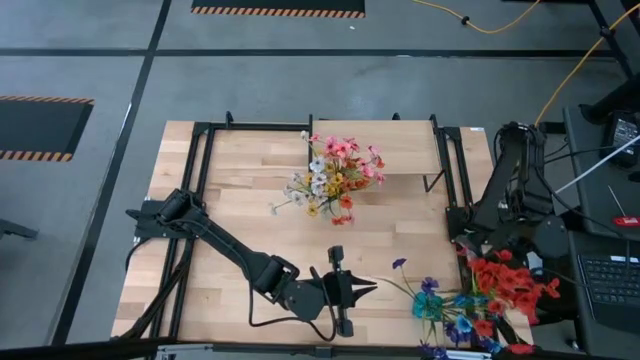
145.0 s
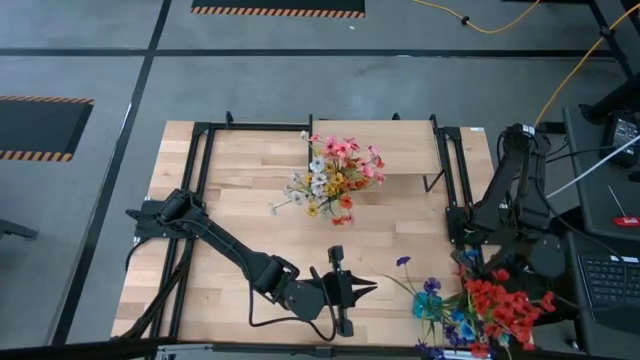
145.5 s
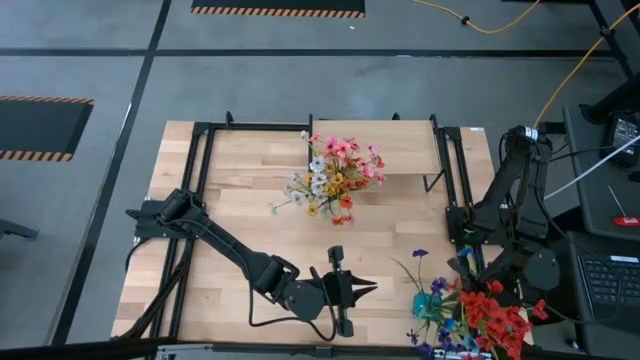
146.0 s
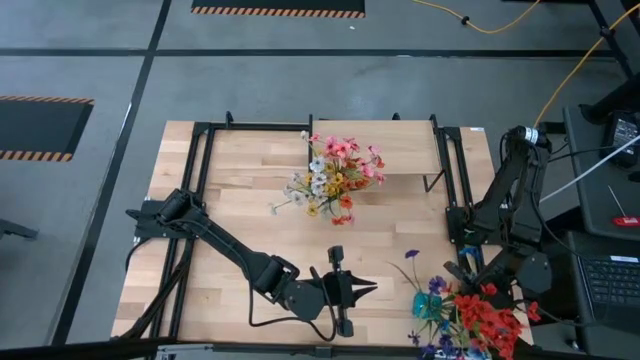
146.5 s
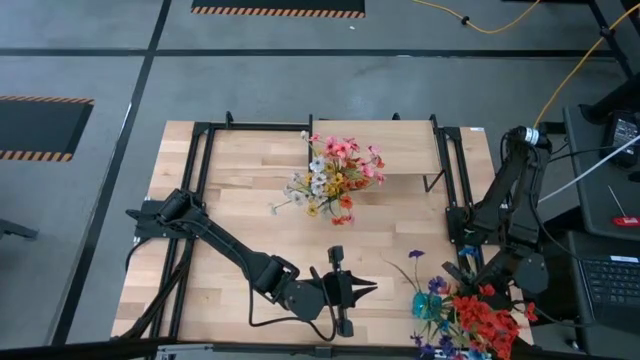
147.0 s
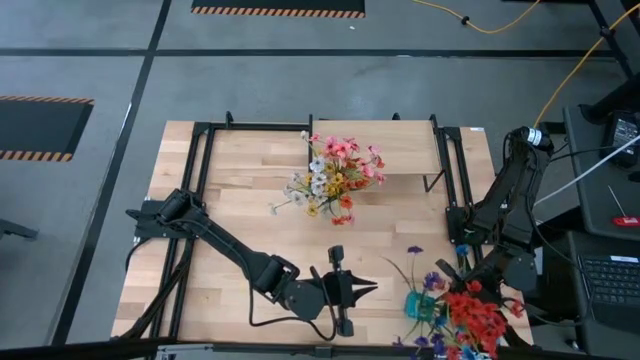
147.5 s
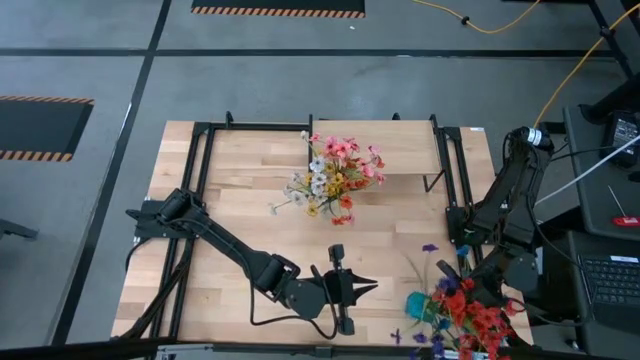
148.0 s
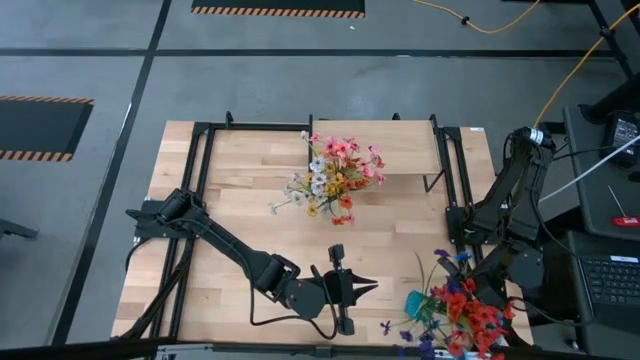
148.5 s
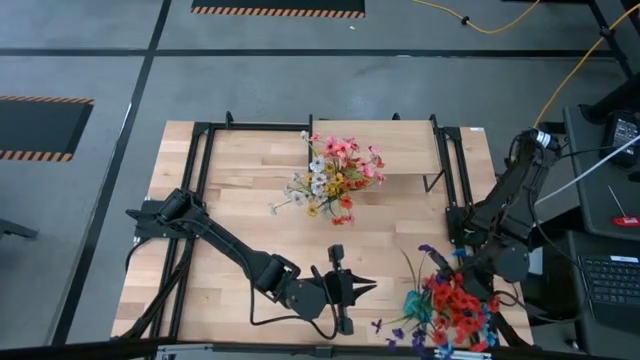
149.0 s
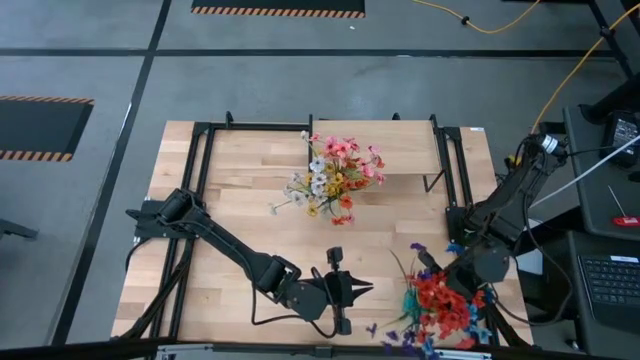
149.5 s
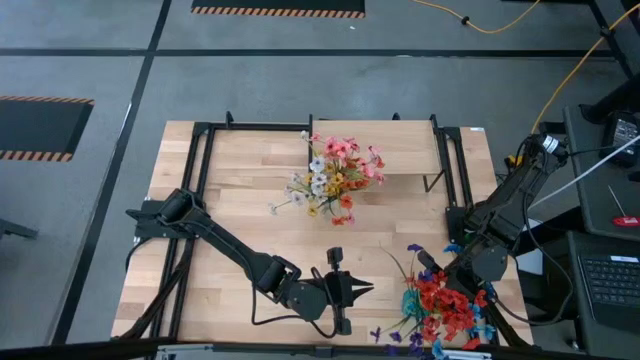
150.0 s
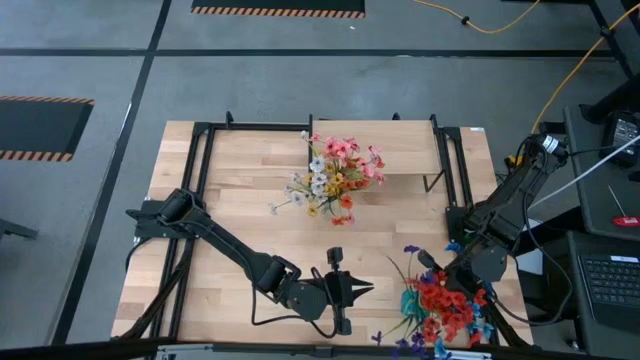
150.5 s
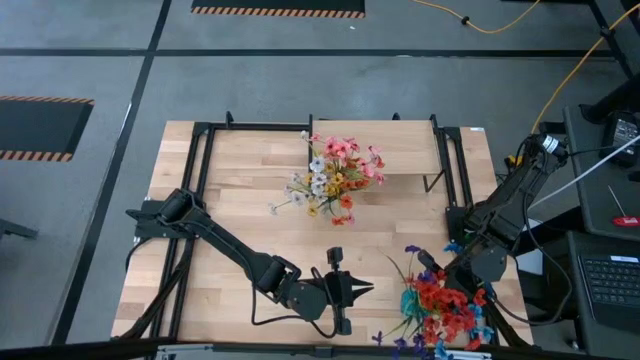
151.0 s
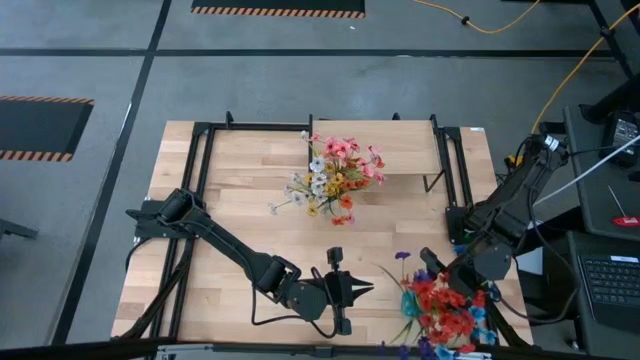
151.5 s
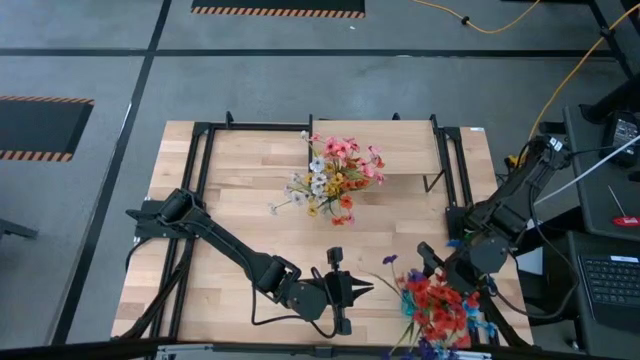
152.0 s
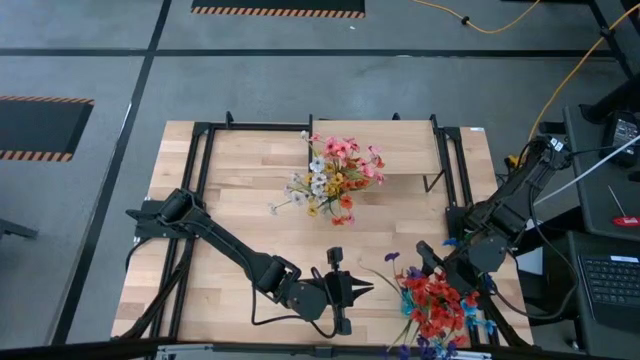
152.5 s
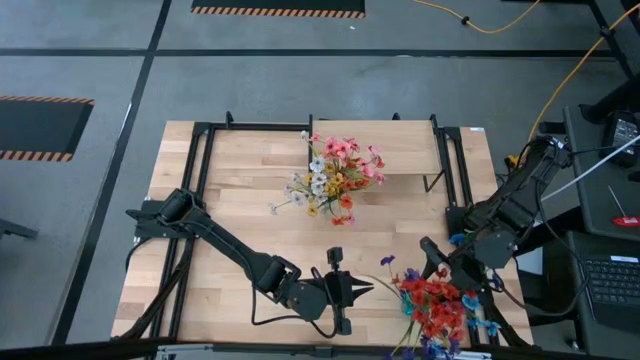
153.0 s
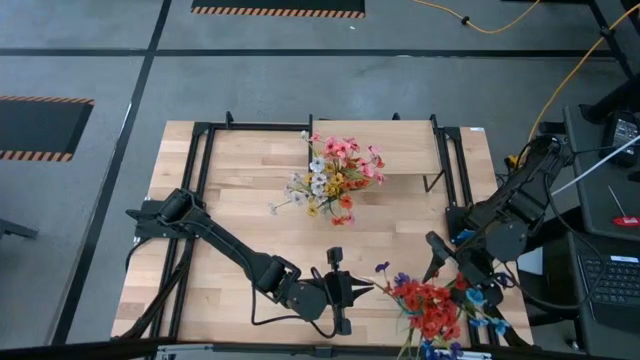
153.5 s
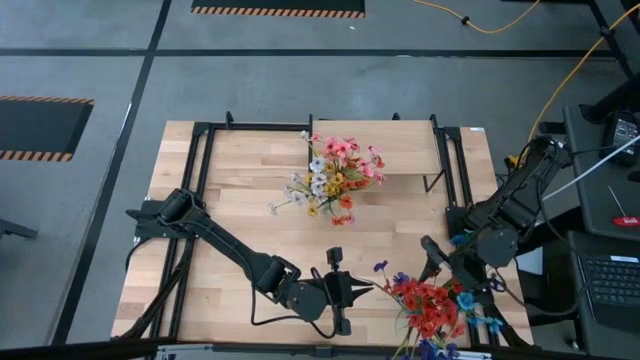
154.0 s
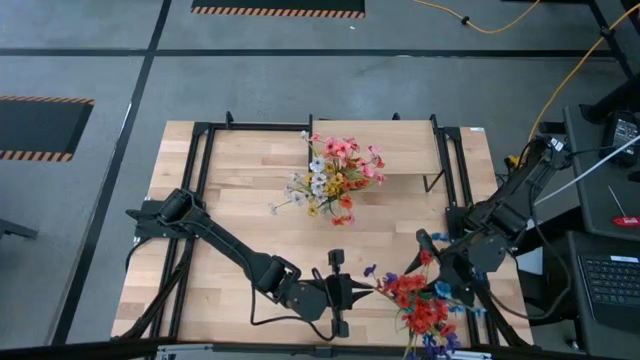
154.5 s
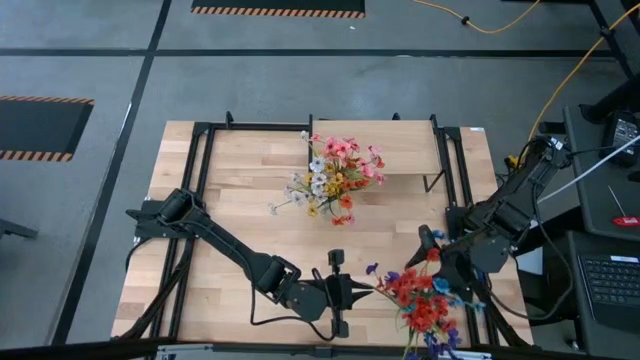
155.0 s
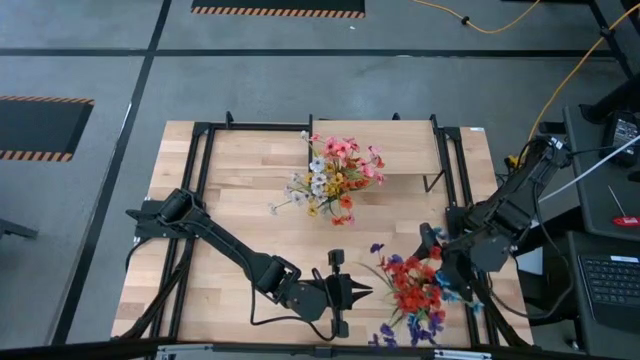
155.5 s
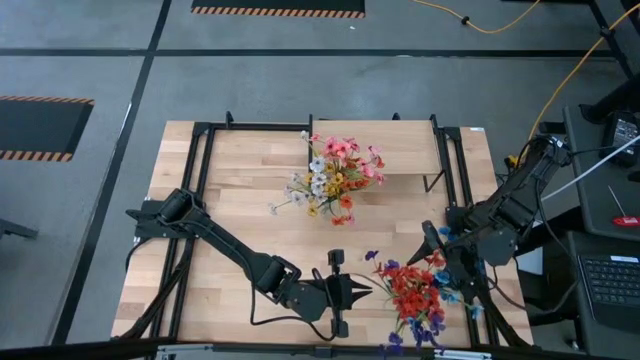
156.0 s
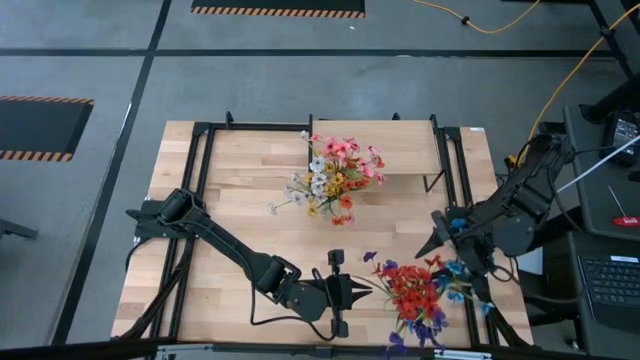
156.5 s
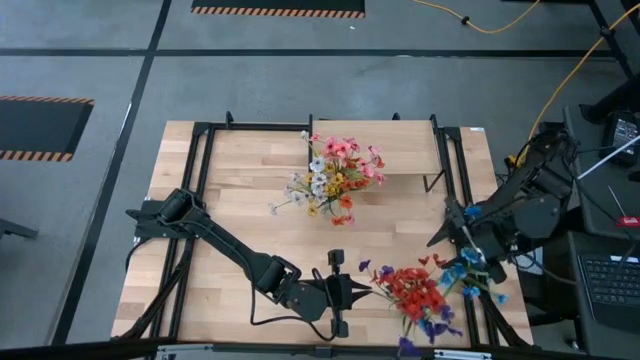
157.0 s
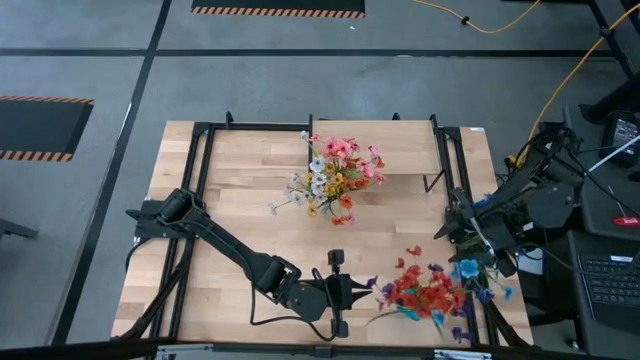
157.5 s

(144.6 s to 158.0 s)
Task: Pick and place flowers into a vace then onto a shelf
Put the red flowers into the blue vase

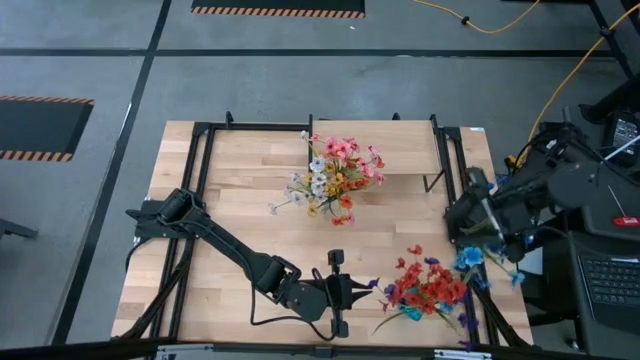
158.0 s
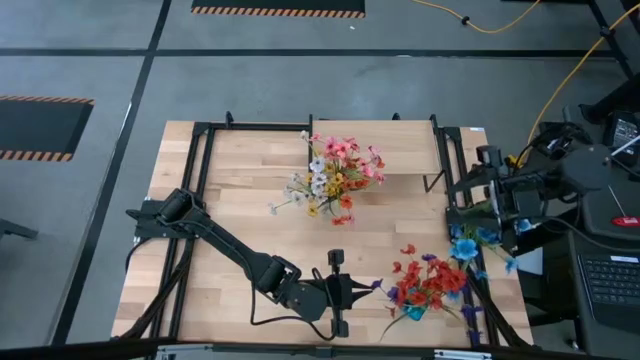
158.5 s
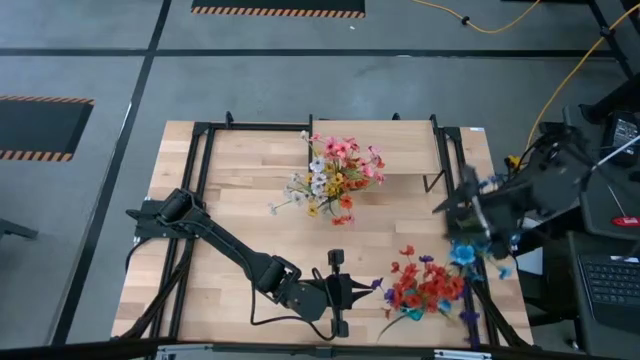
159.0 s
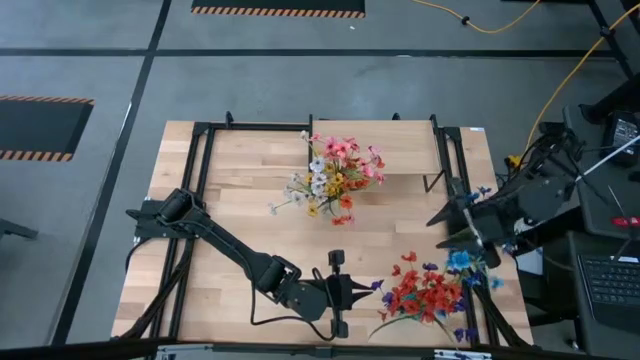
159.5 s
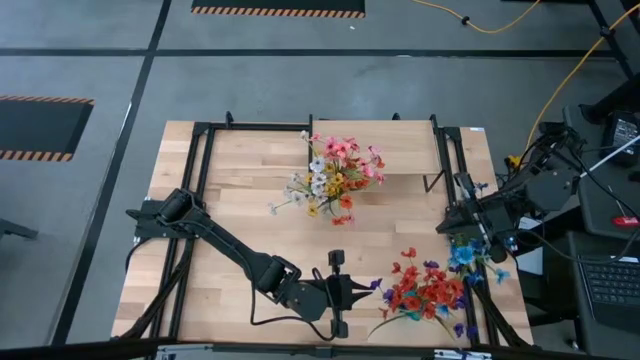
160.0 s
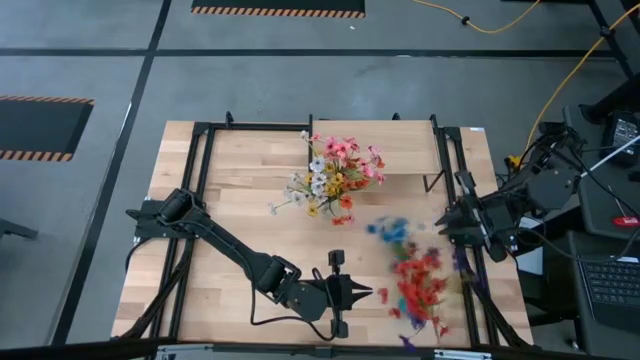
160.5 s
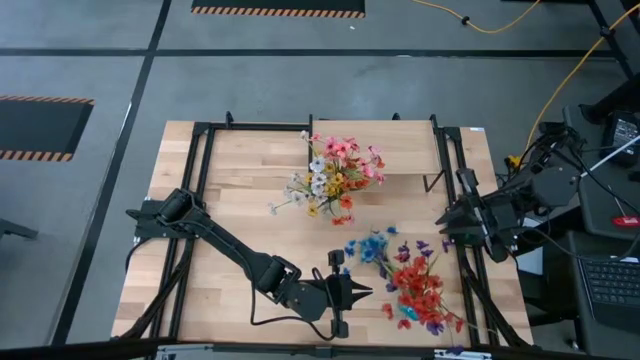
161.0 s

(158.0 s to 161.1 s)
Put the blue flowers into the blue vase

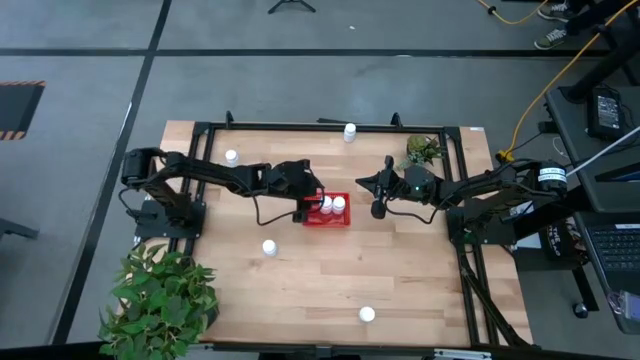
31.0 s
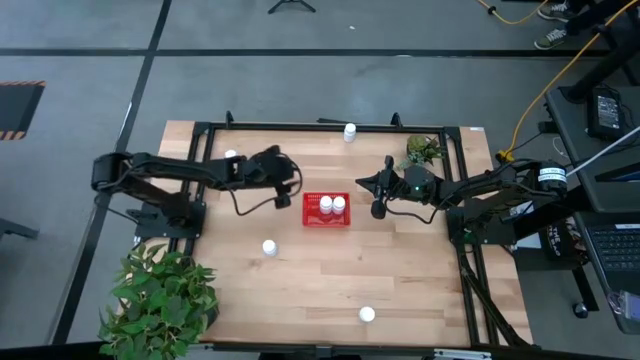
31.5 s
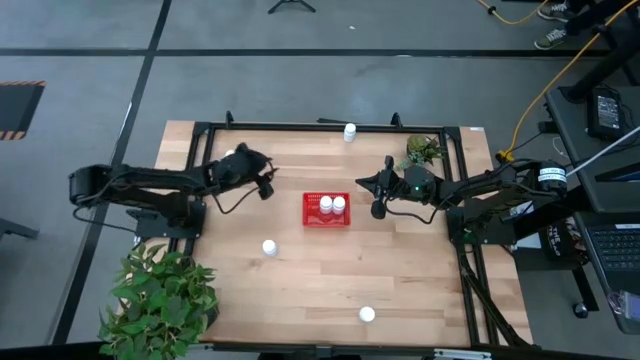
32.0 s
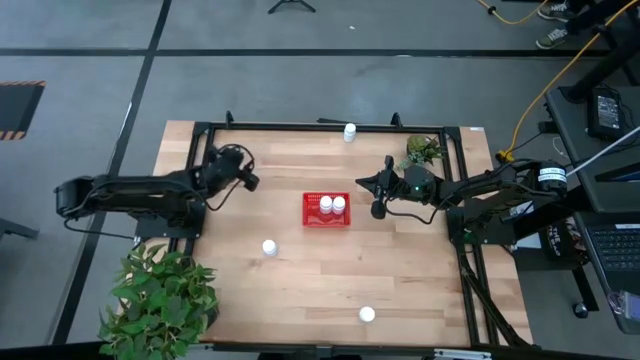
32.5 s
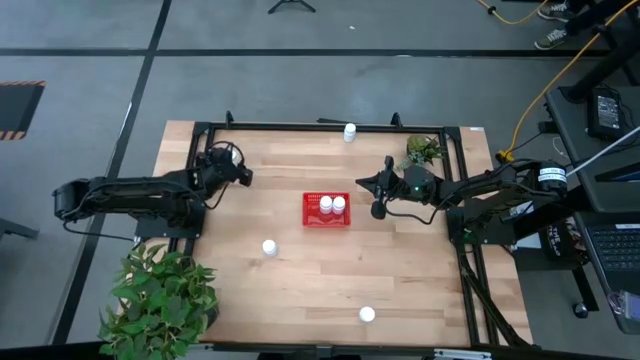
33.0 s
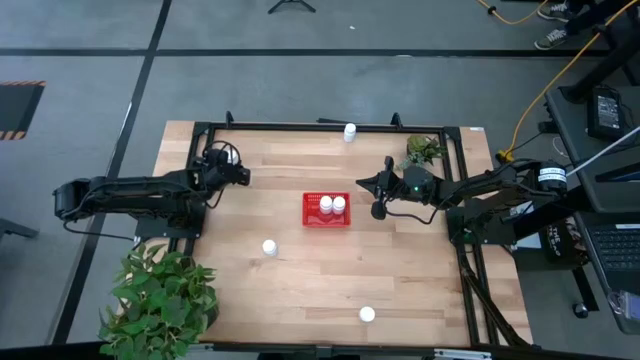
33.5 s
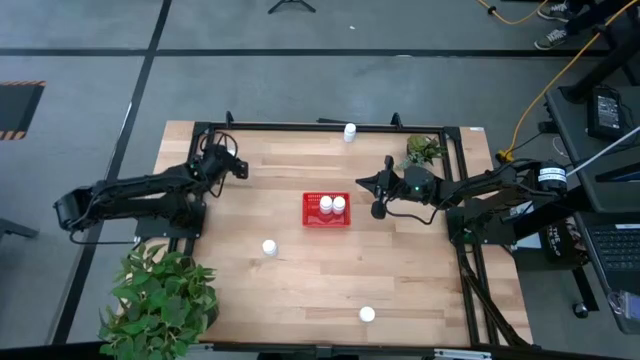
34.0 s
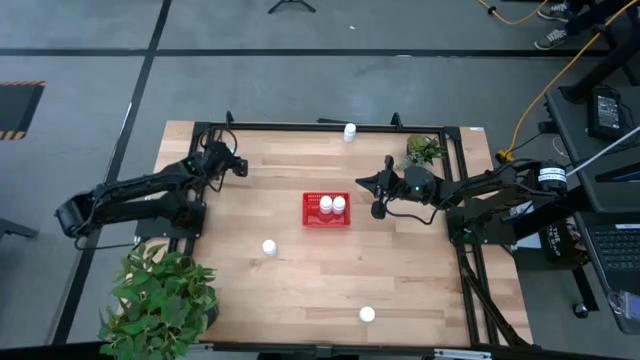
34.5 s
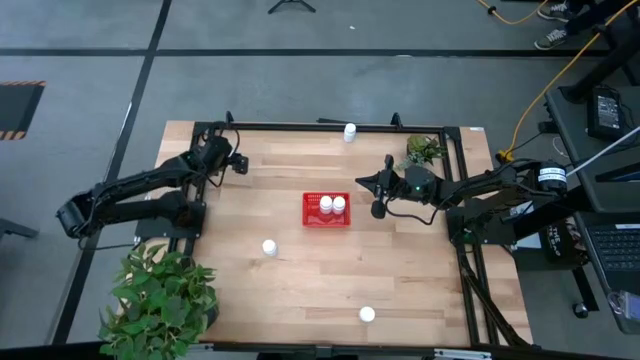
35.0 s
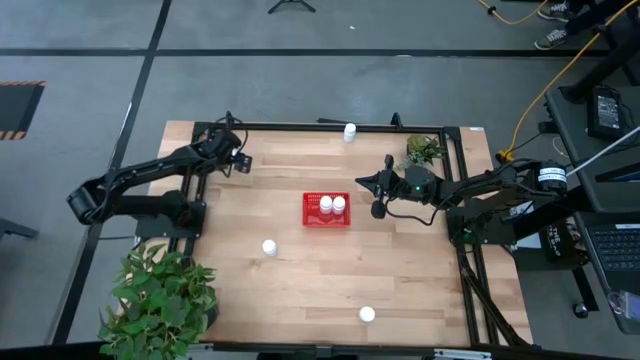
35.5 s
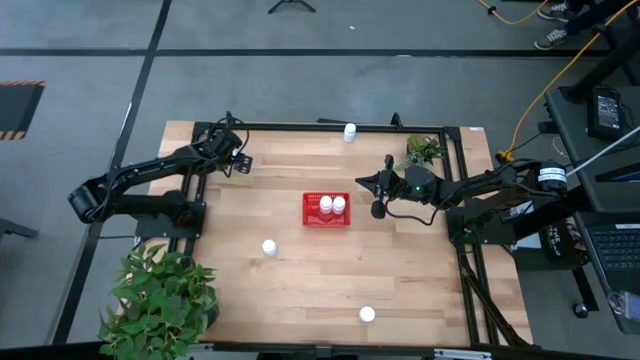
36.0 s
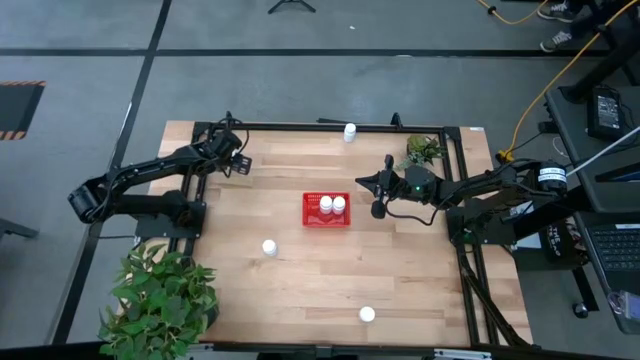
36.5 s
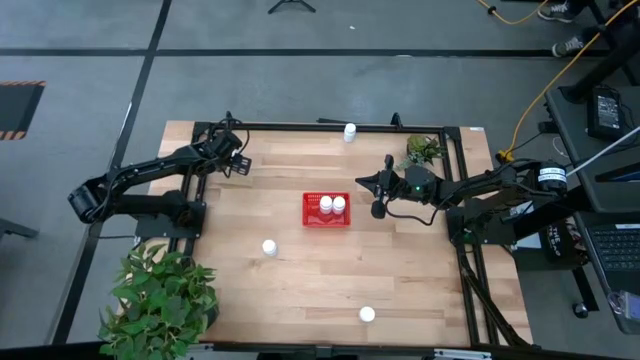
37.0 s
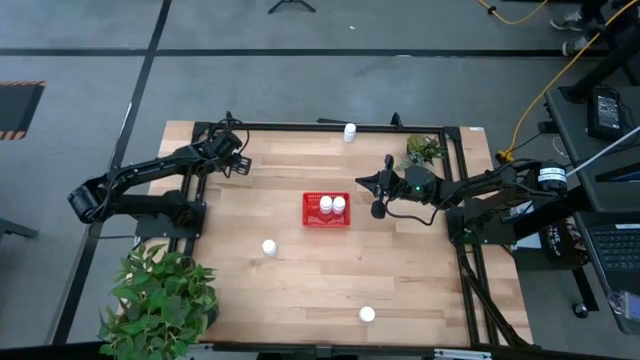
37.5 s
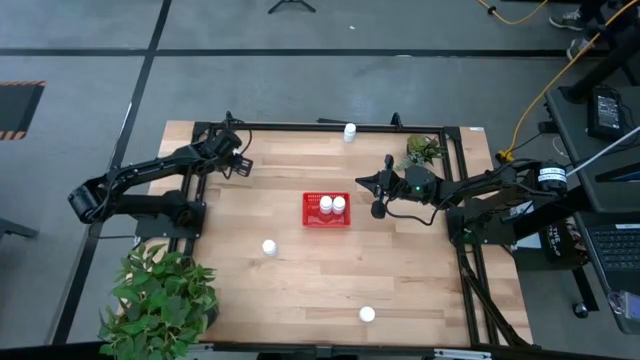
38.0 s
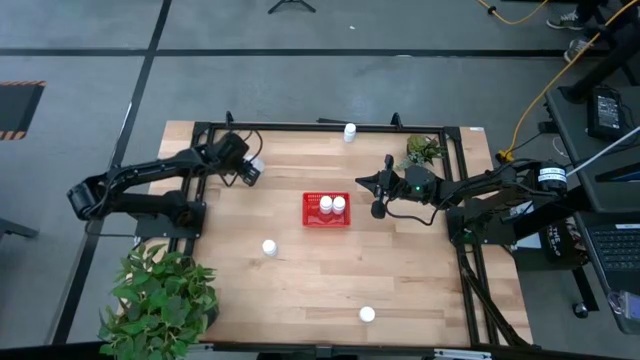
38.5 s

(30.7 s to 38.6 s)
Task: Pick and place pill bottles into a basket
Put the white pill bottle into the red basket
